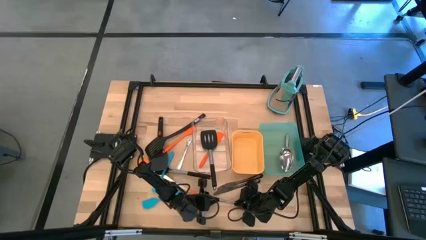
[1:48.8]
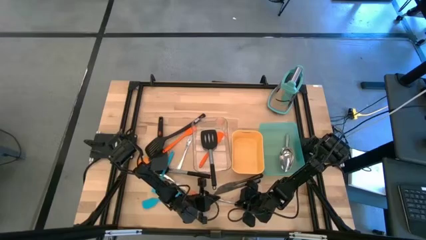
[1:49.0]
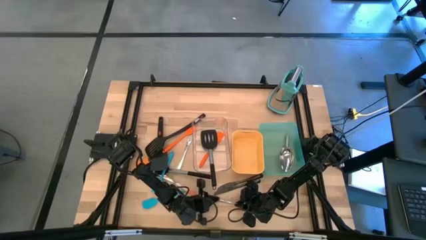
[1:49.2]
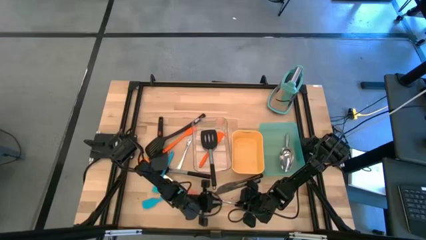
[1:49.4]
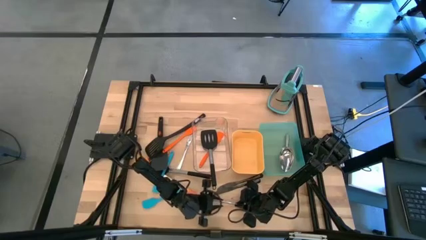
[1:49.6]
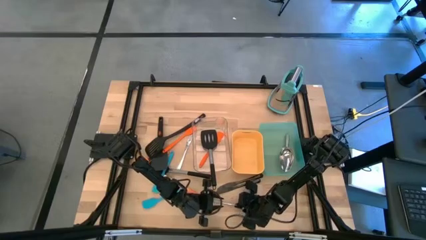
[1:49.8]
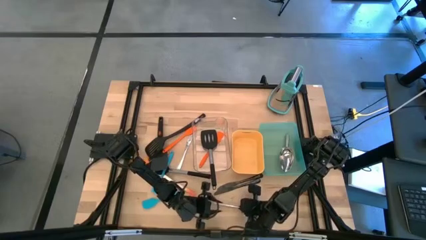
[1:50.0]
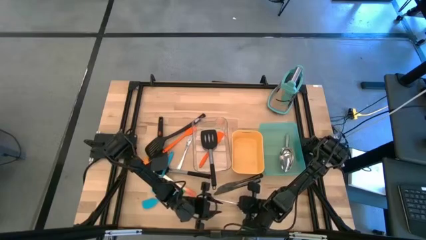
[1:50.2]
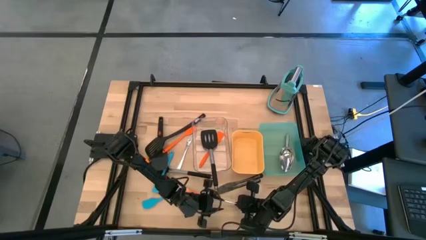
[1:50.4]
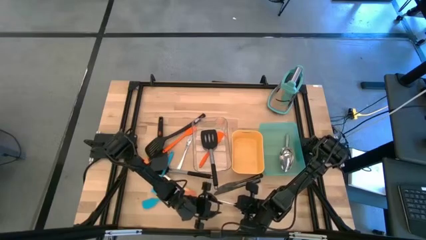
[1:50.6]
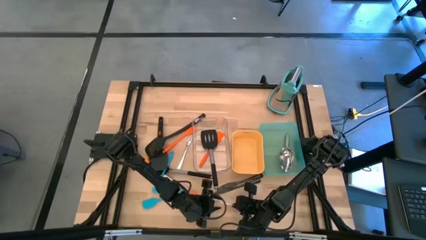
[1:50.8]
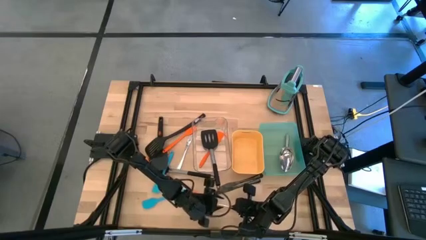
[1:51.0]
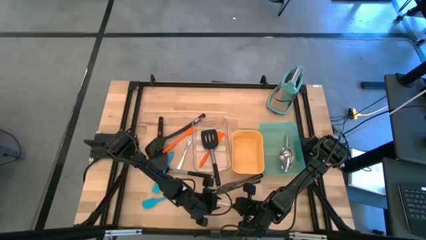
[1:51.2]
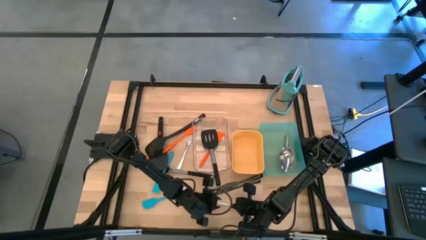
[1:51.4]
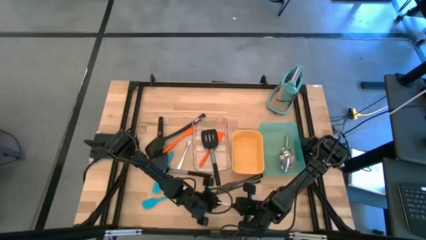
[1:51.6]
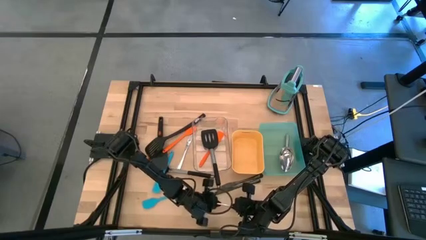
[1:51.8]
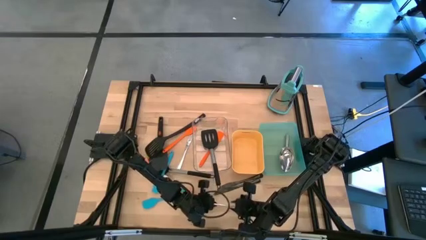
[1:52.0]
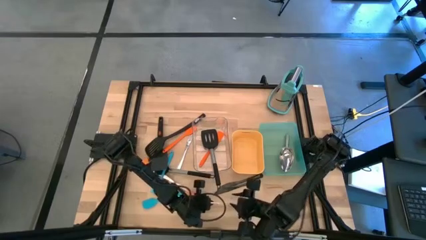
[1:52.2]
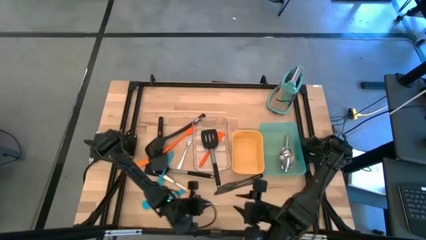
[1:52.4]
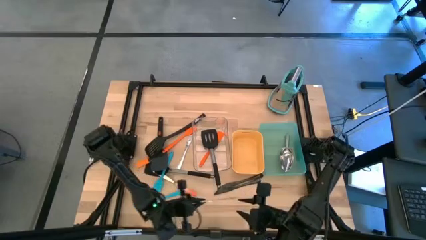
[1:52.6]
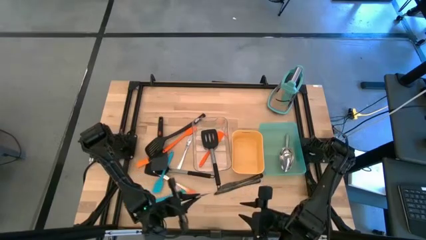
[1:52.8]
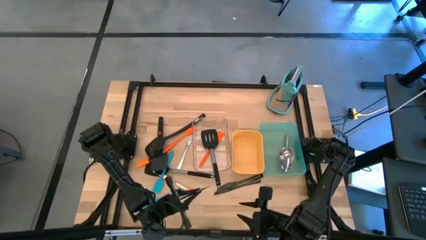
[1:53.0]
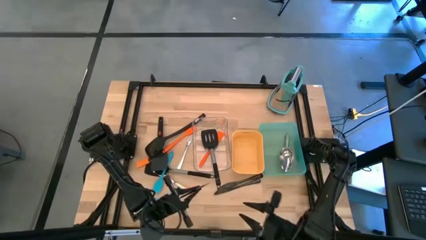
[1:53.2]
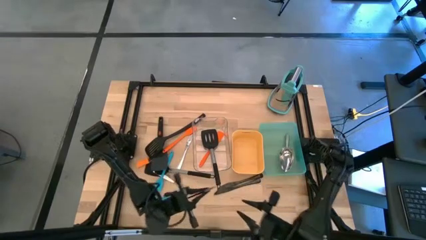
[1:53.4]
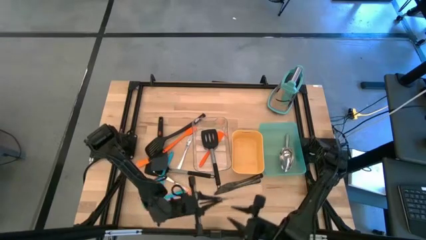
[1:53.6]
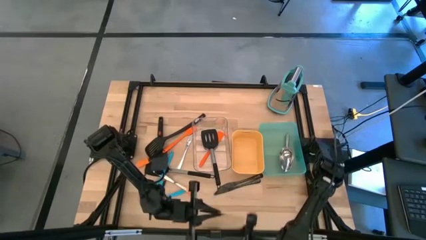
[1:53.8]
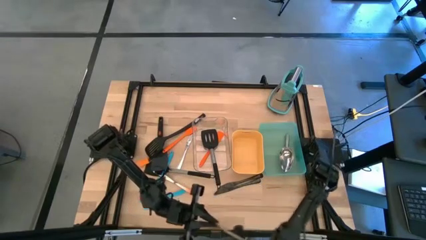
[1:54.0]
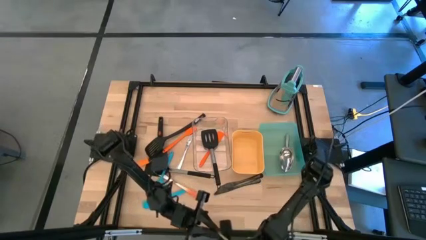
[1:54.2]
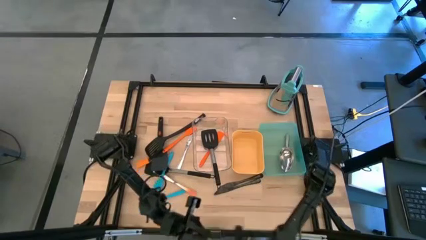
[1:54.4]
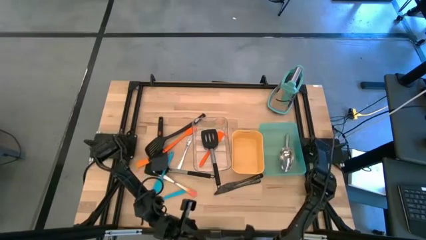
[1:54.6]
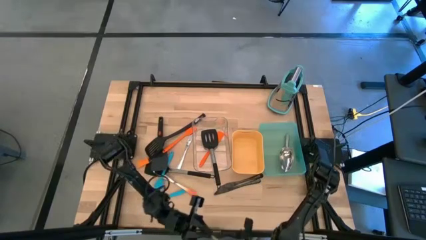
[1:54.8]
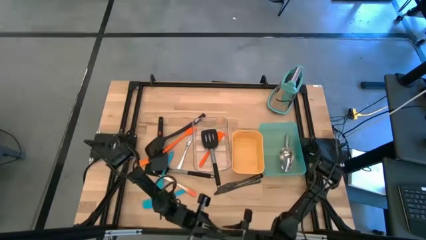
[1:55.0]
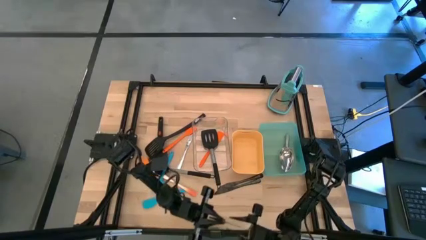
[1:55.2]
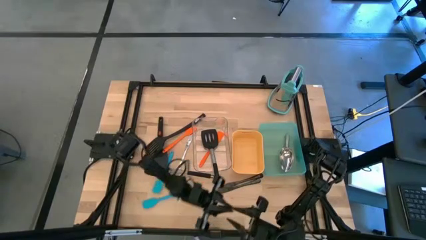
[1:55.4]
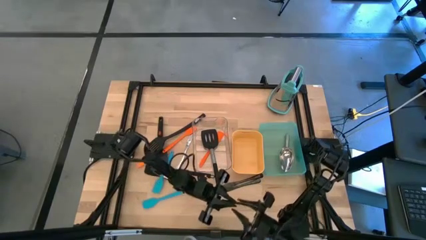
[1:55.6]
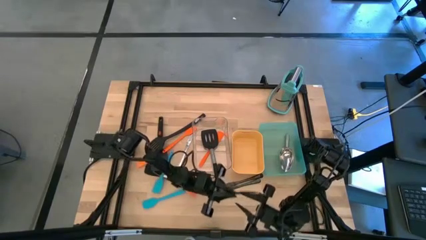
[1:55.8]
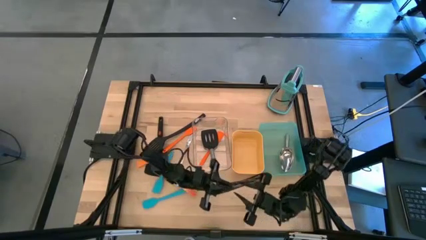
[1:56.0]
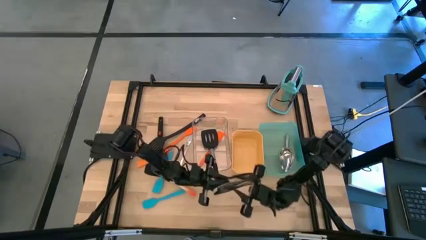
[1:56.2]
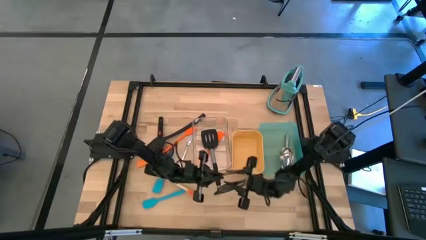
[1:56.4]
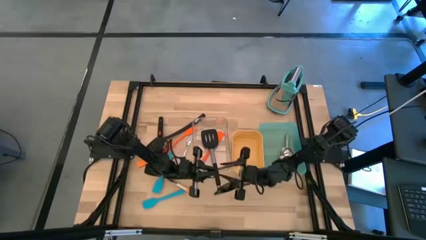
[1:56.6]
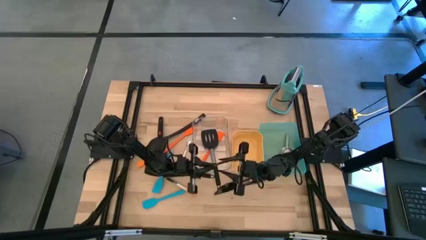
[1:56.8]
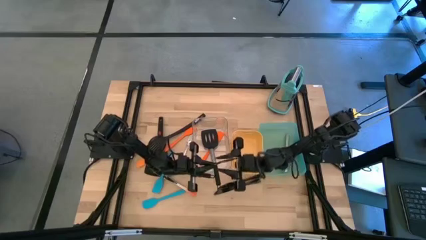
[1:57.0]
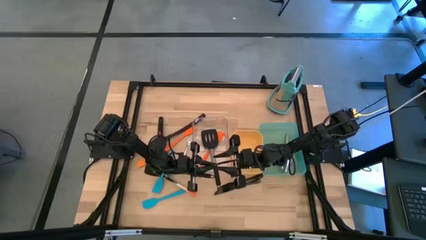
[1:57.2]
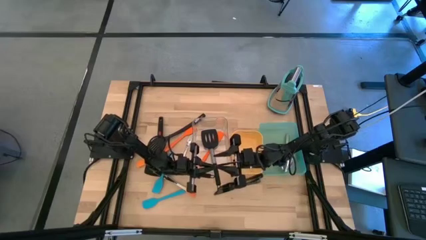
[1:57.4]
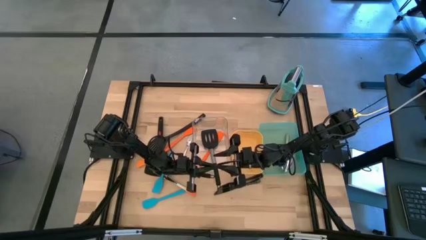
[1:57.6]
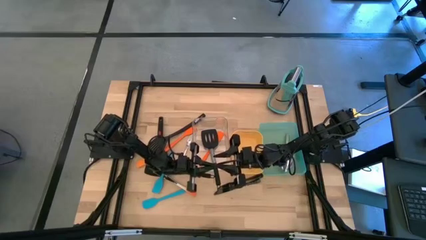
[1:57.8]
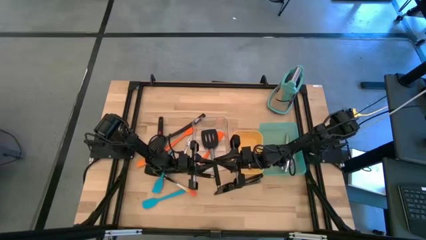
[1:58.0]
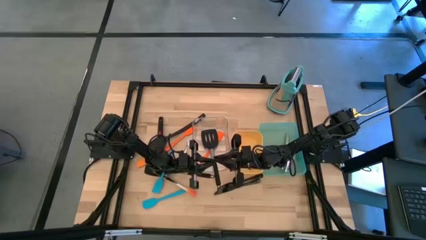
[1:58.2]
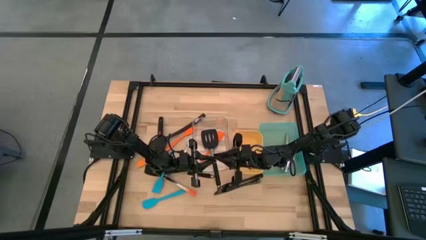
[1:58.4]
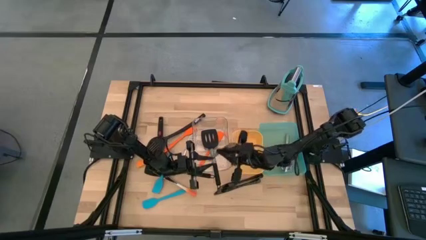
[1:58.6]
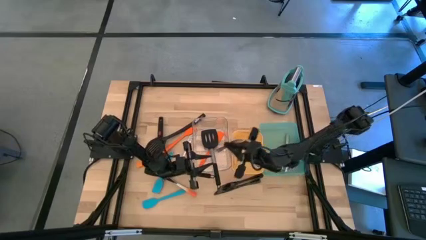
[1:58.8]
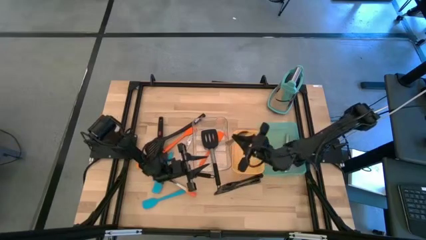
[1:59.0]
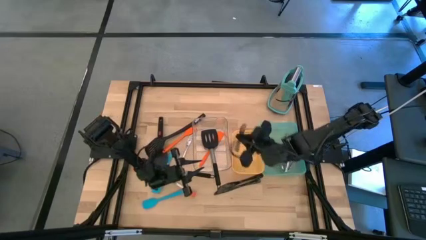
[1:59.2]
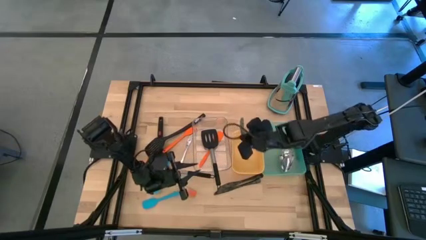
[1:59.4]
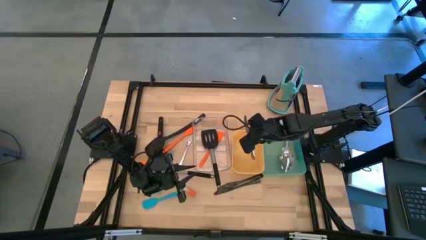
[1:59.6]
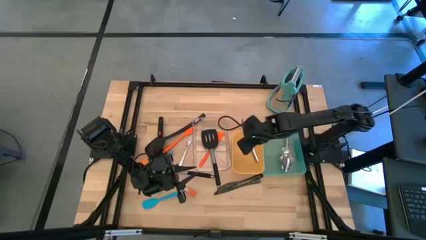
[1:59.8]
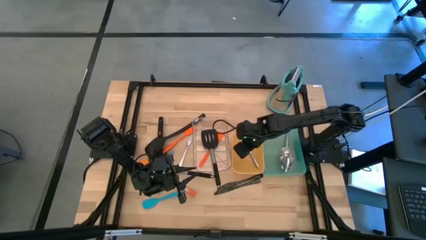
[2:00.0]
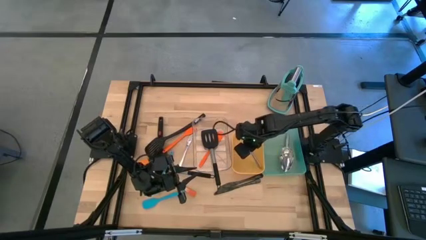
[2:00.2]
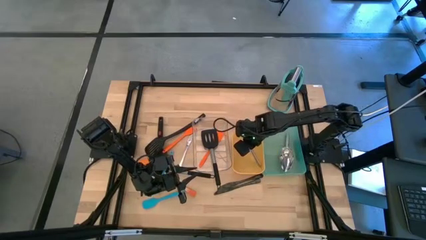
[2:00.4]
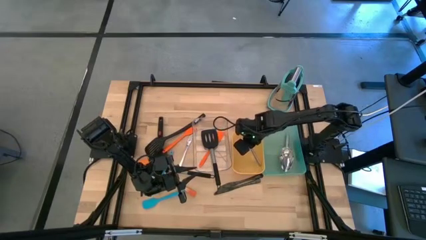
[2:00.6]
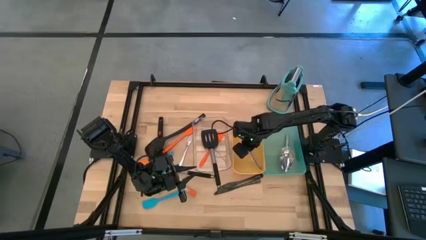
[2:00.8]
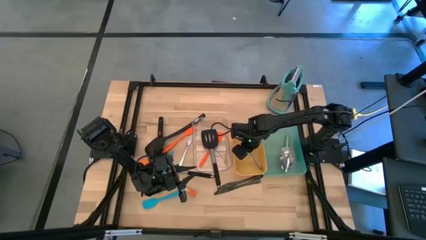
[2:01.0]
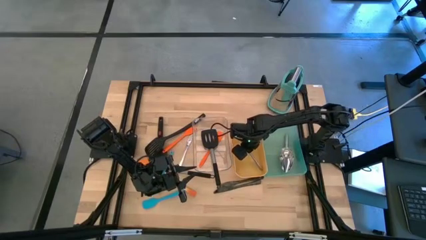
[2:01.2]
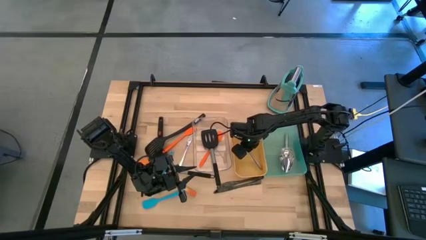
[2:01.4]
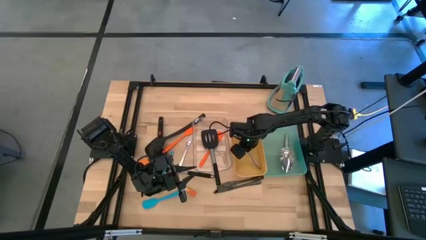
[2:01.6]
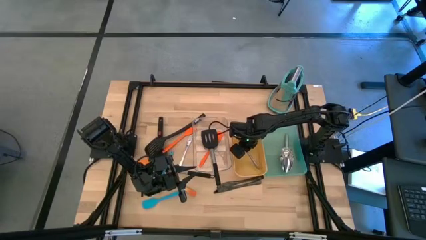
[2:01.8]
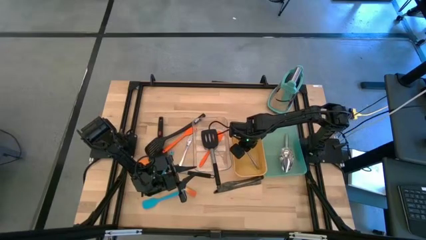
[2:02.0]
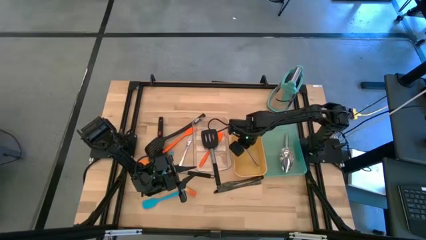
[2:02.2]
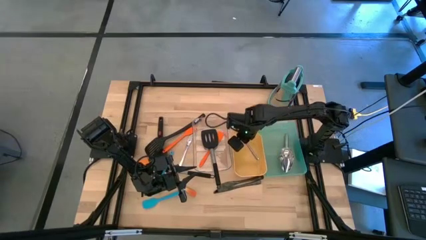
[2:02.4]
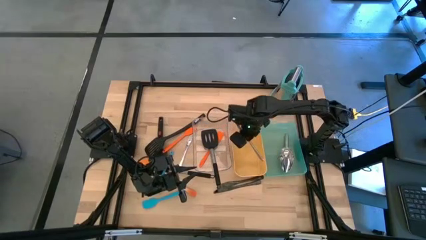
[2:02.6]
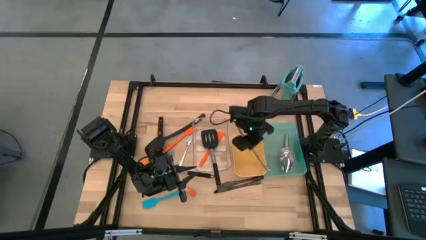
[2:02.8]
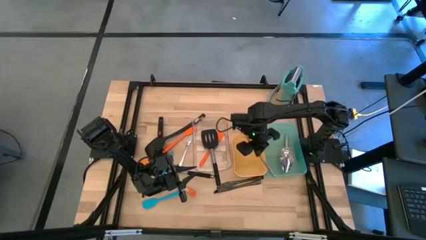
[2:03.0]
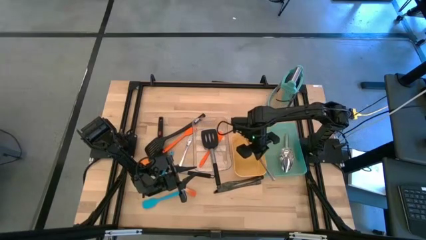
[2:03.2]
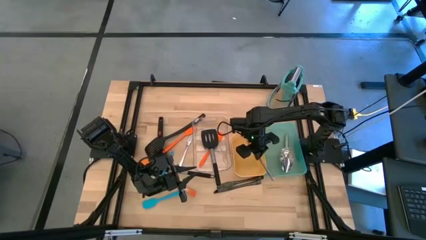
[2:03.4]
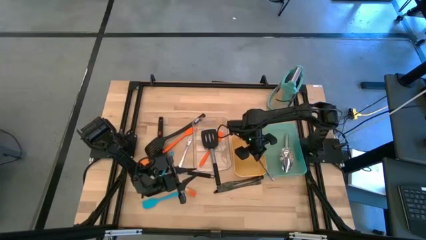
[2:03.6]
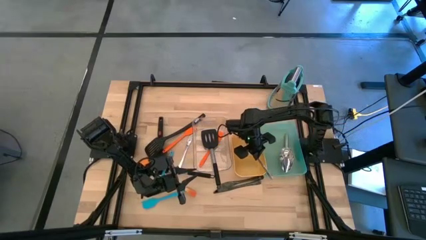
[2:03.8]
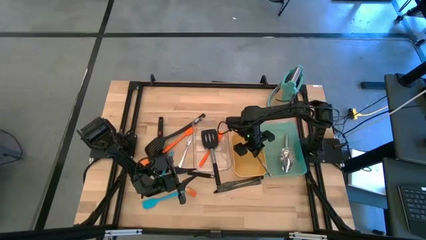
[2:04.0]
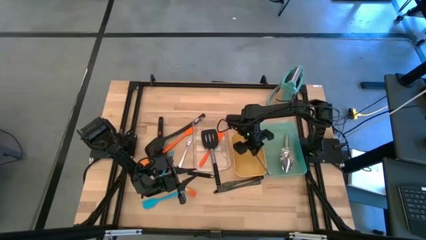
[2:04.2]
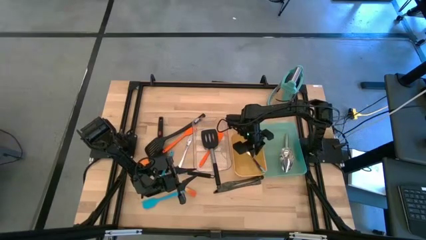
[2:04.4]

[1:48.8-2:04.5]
Task: Pick & Place Kitchen Items
Put the silver table knife into the yellow bin
